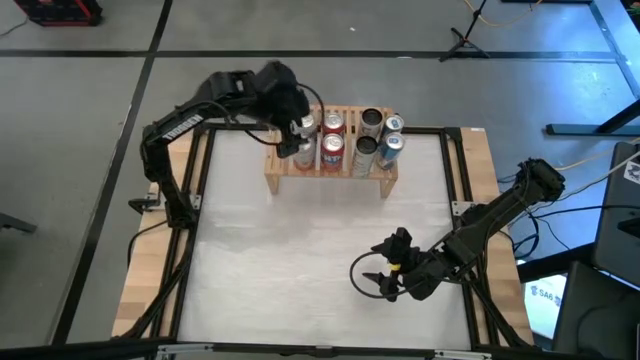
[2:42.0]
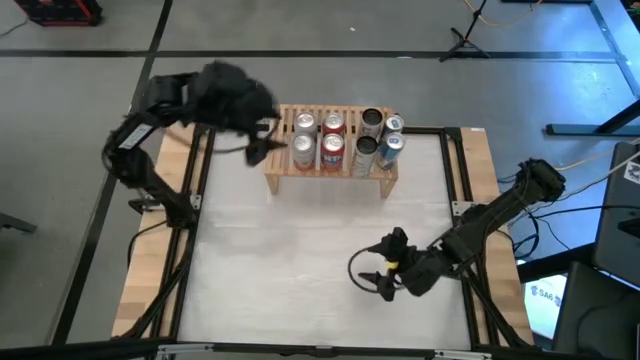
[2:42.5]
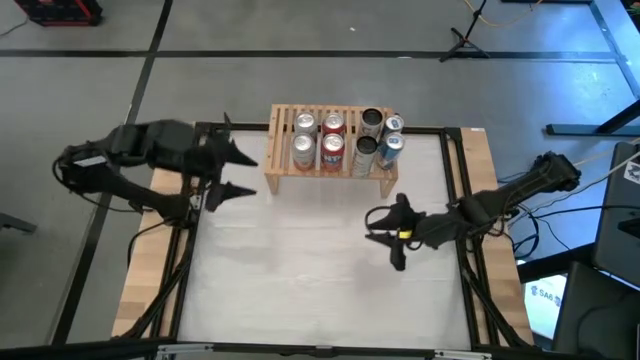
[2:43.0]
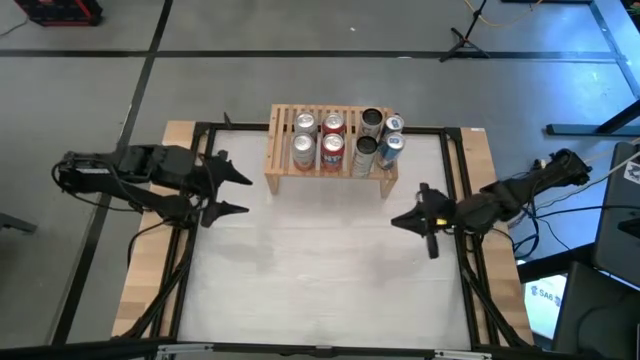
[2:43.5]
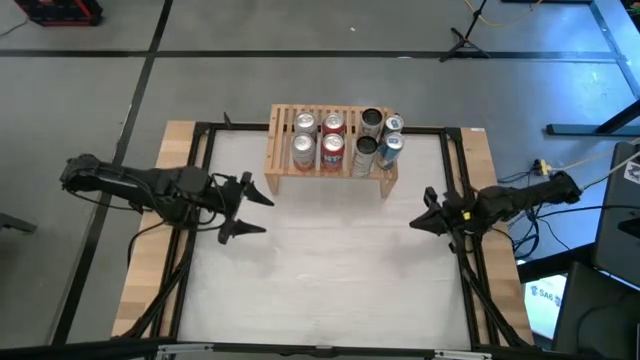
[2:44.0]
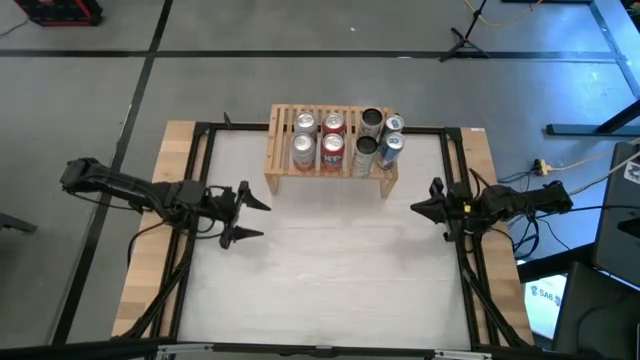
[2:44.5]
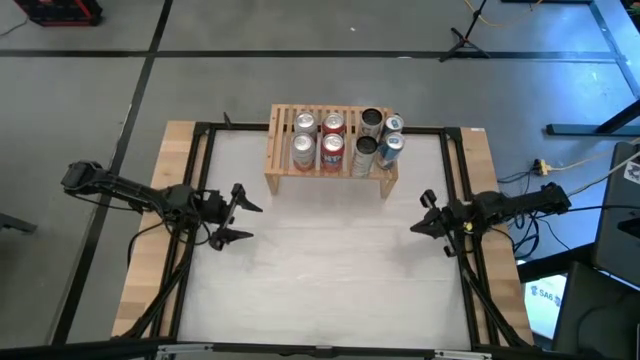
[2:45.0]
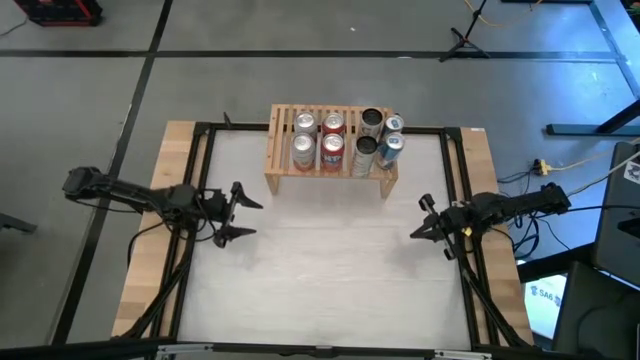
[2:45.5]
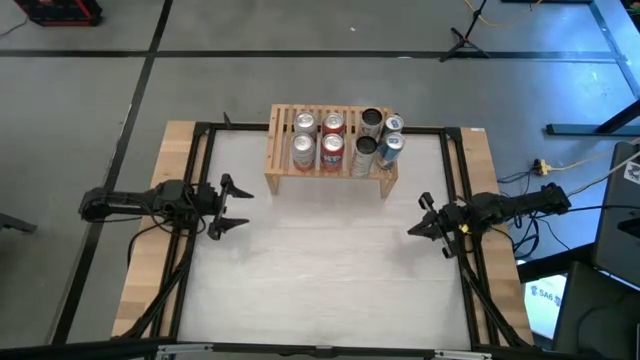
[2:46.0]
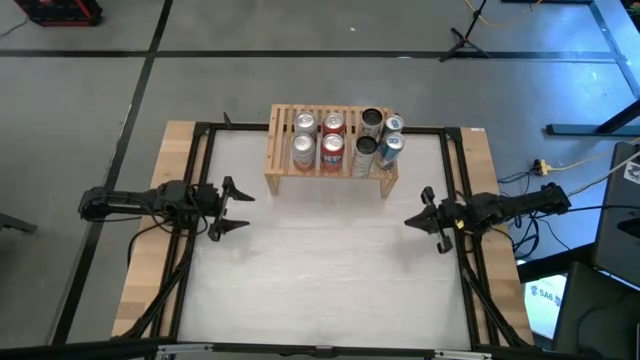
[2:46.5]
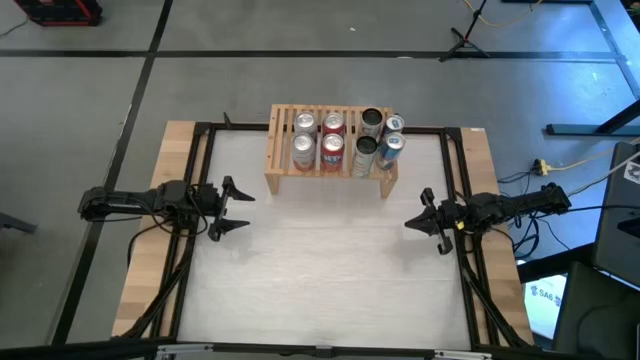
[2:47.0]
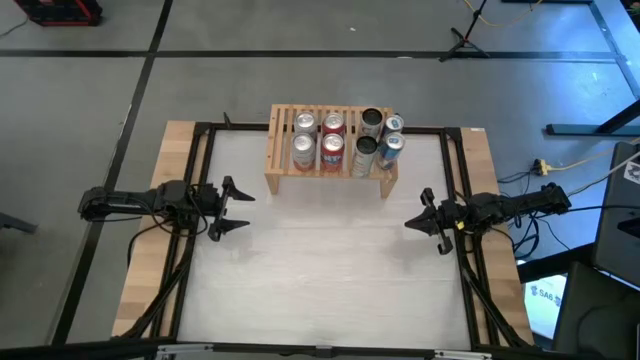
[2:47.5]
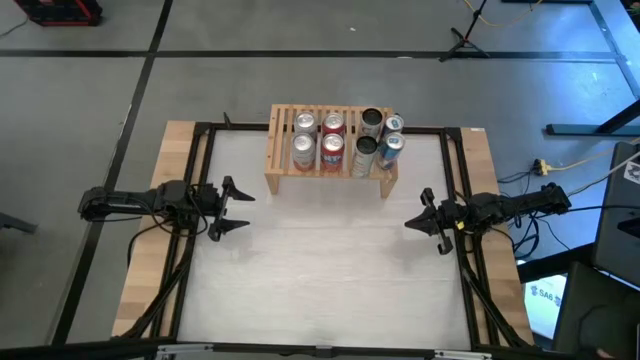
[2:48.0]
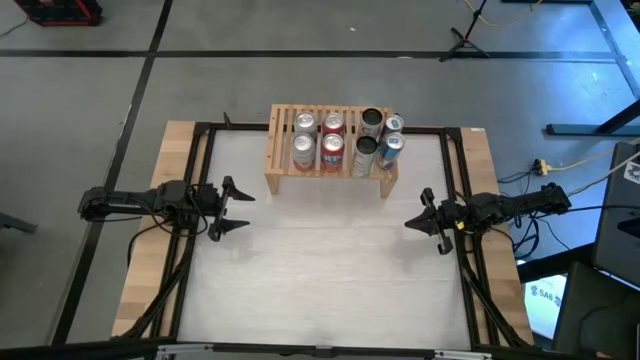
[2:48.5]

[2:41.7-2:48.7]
Task: Place canned beverage on shelf
Return to Home Position

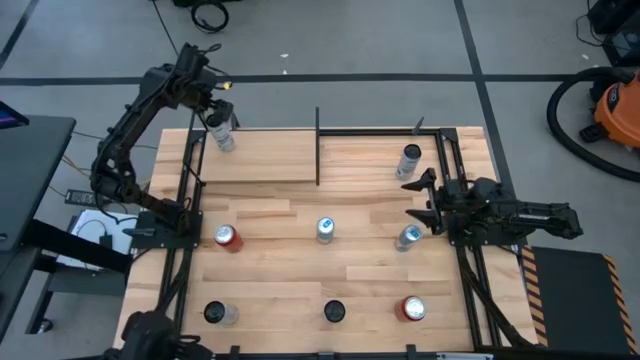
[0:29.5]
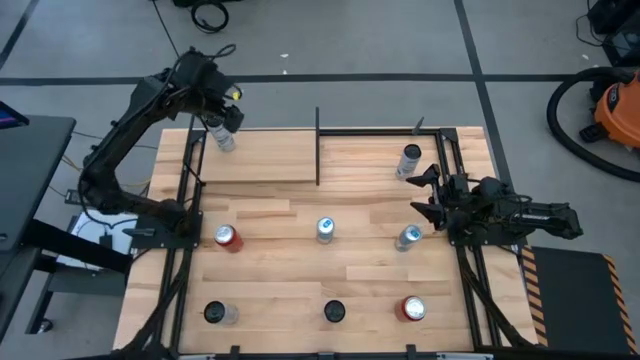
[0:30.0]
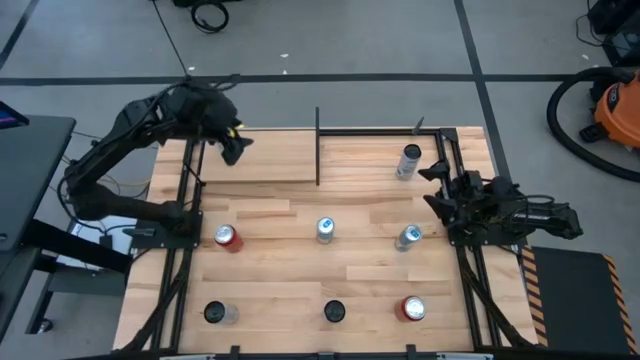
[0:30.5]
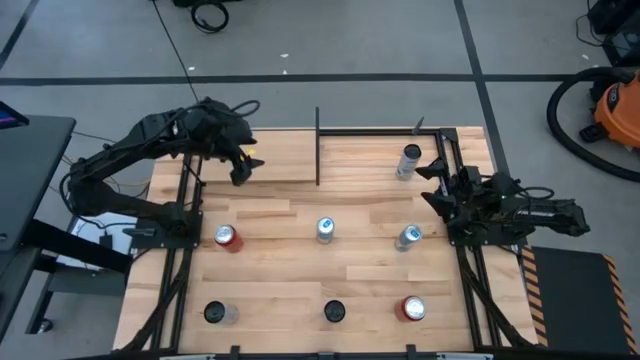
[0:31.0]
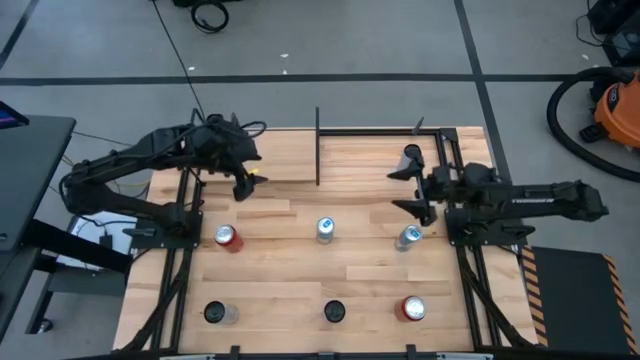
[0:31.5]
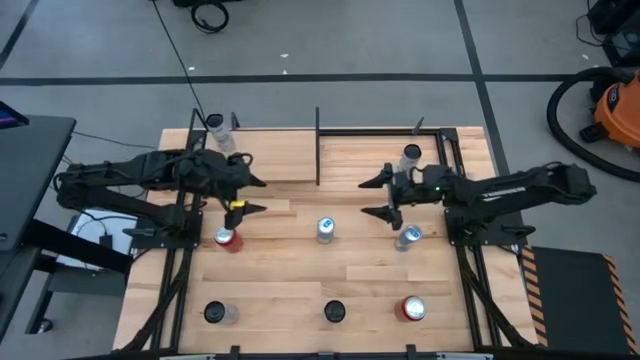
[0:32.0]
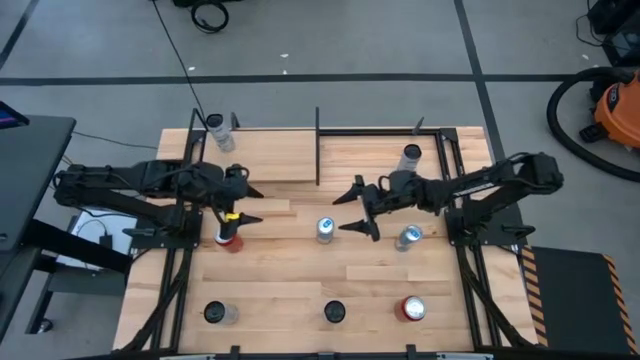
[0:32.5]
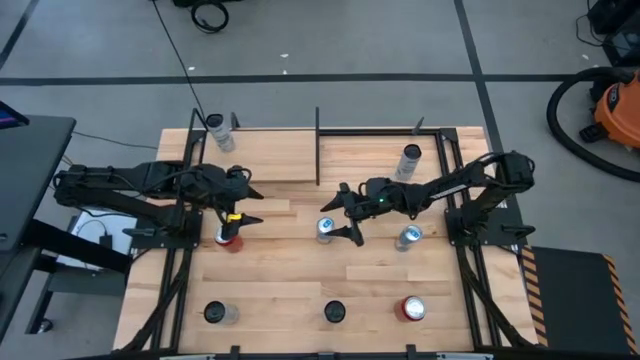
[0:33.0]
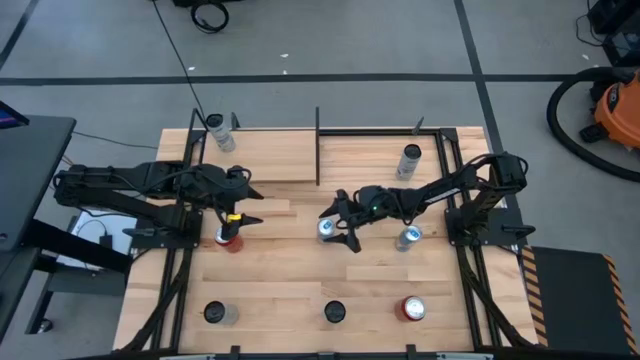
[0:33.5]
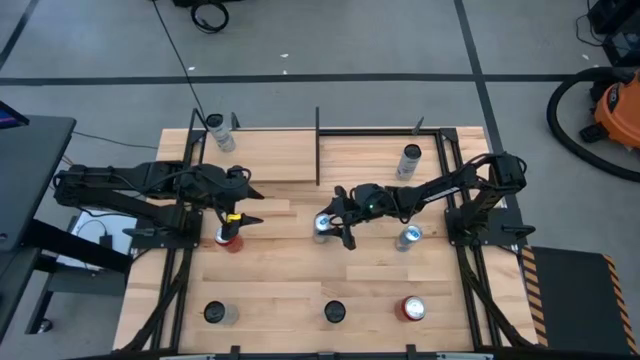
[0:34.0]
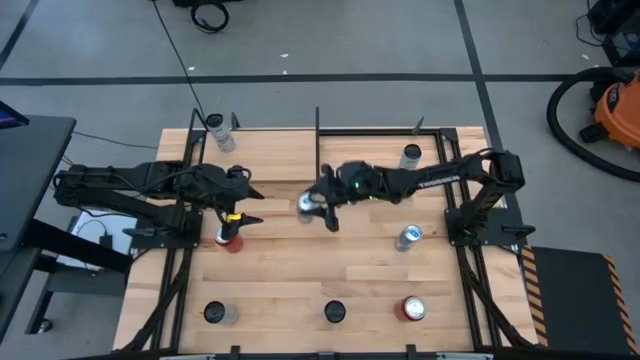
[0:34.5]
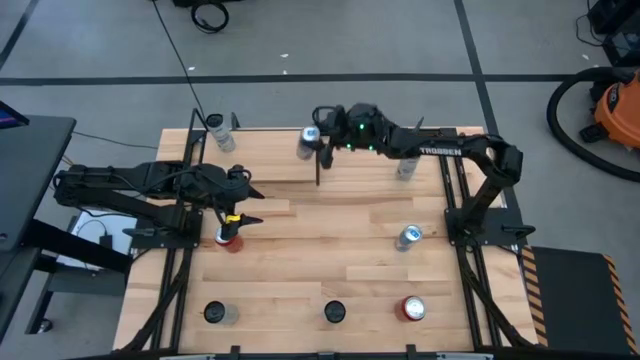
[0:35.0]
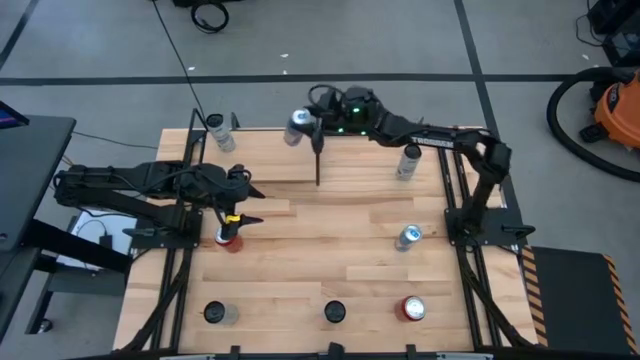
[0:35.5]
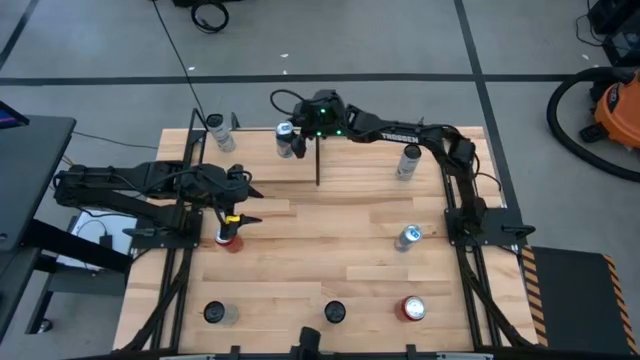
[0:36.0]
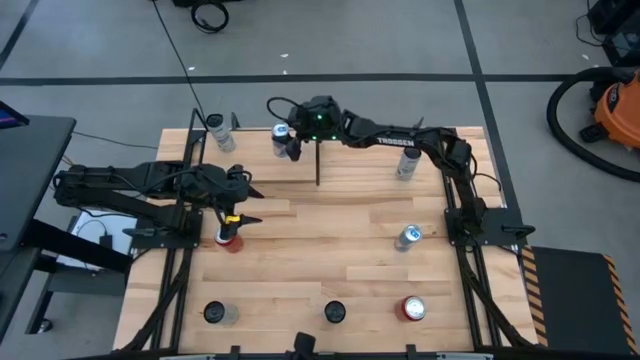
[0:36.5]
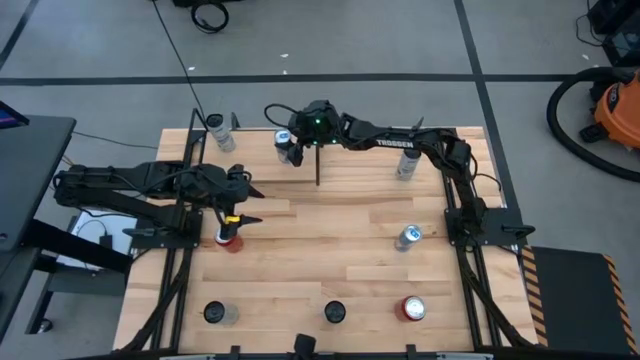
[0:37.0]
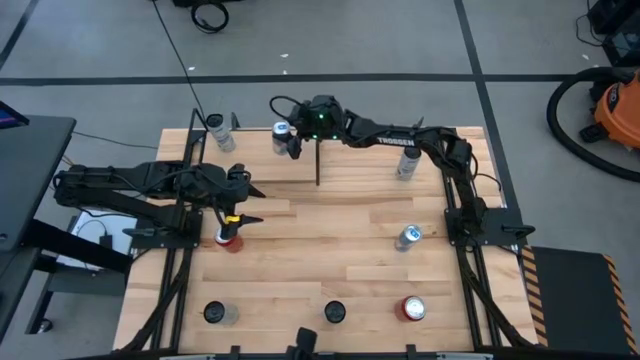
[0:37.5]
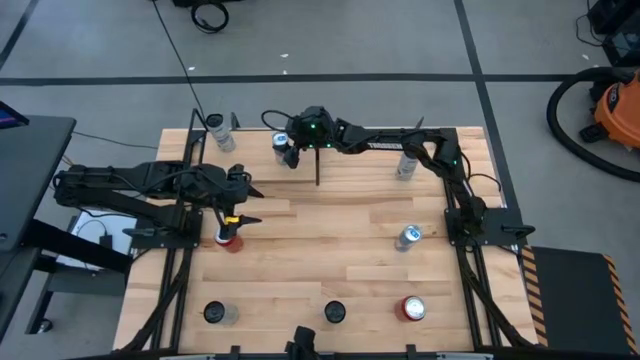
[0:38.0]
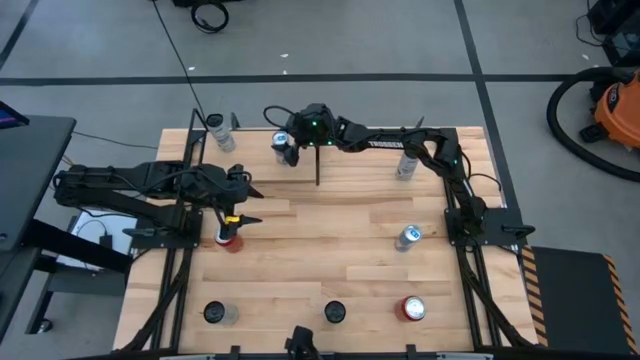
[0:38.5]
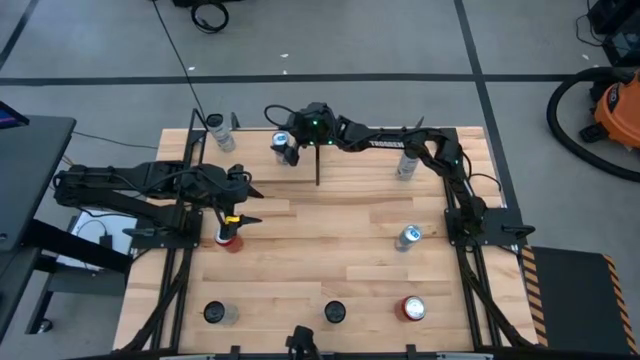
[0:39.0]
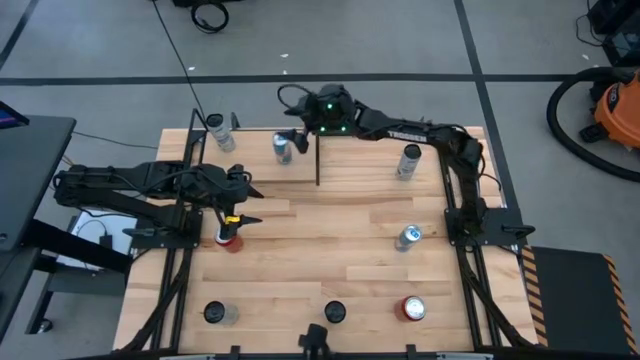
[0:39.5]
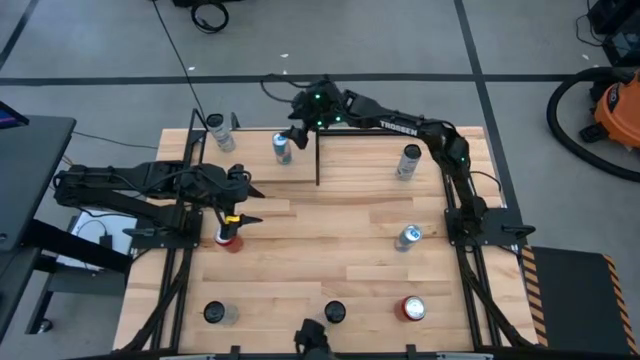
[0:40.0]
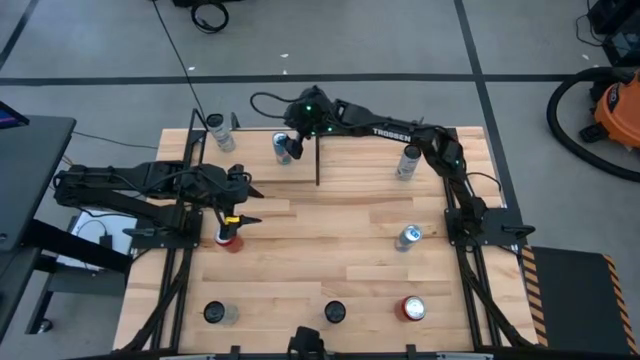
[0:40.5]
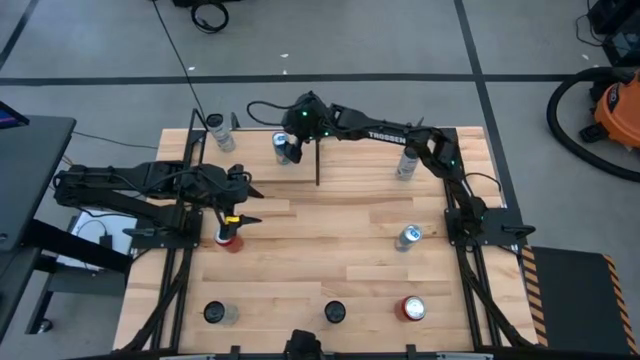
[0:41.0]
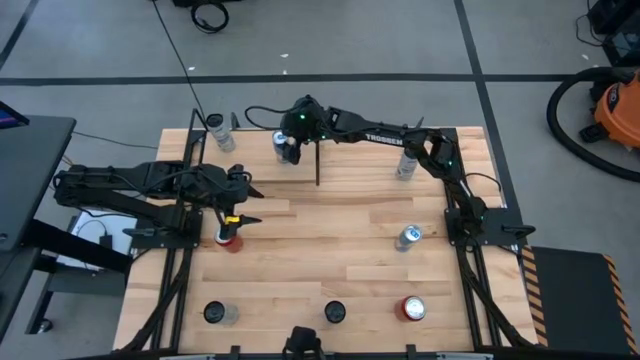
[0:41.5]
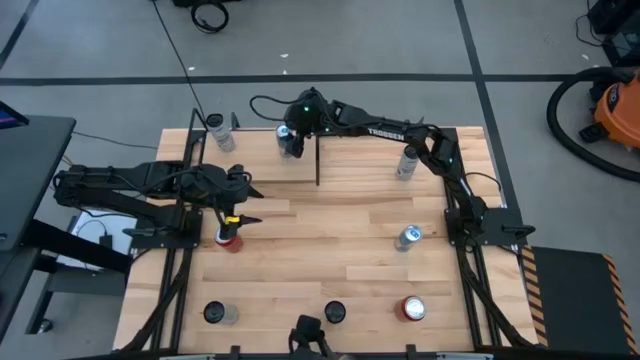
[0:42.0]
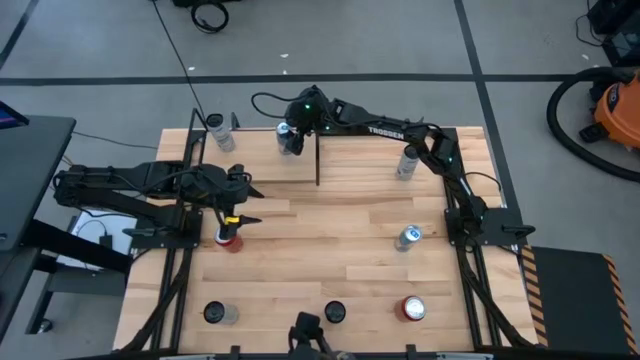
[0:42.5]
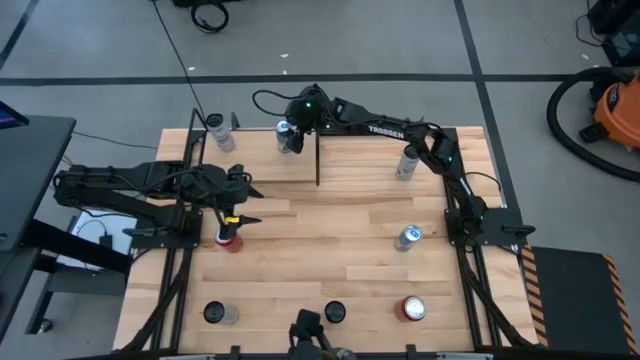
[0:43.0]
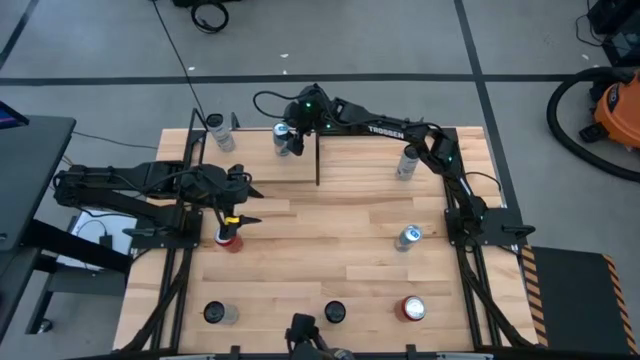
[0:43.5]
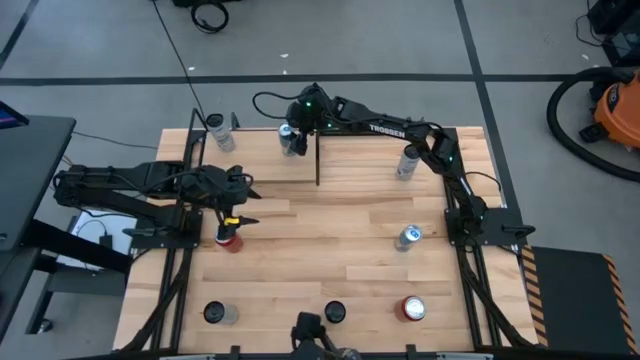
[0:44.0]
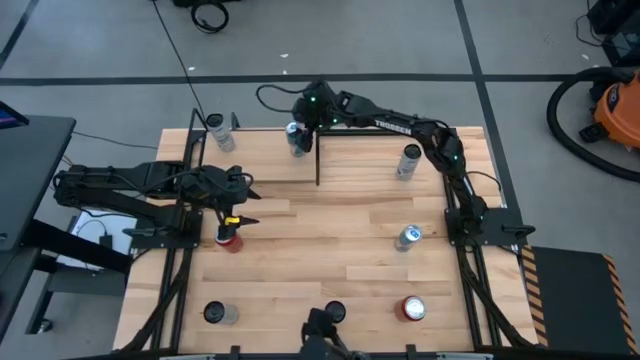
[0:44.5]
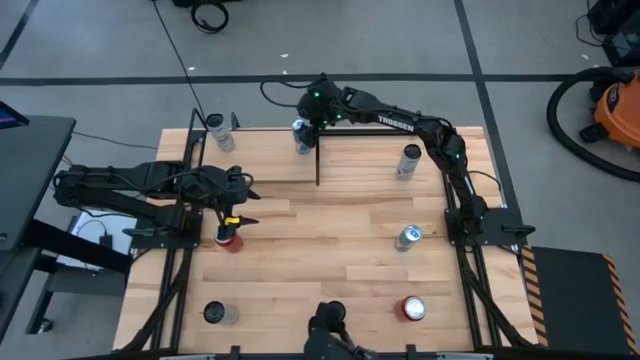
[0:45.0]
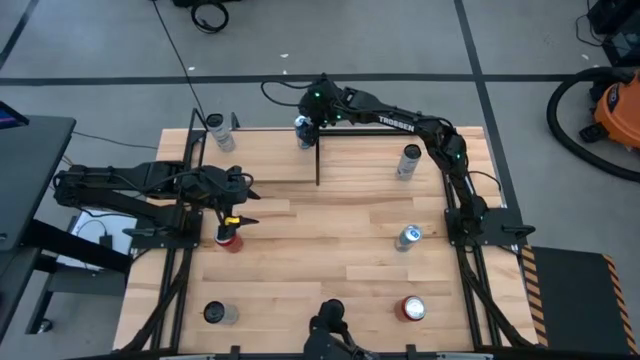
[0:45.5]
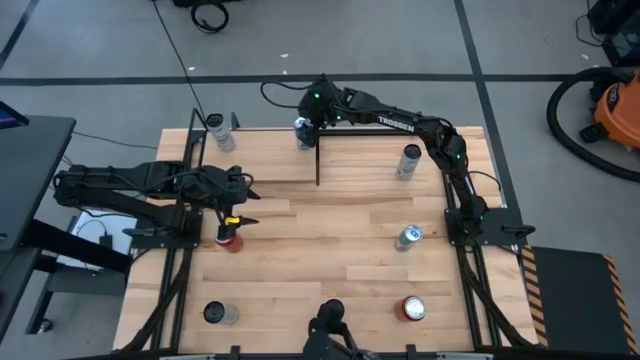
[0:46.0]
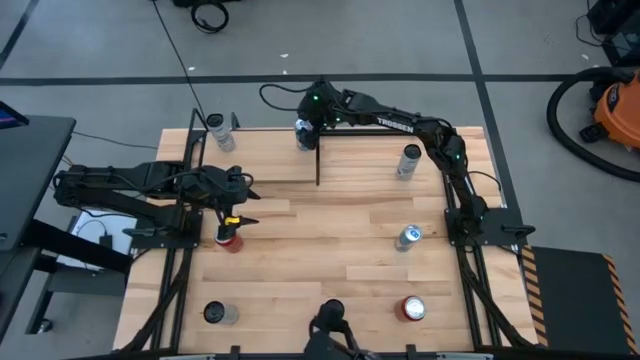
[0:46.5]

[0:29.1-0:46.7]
Task: Place canned beverage on shelf
Put the blue soda can on the shelf
